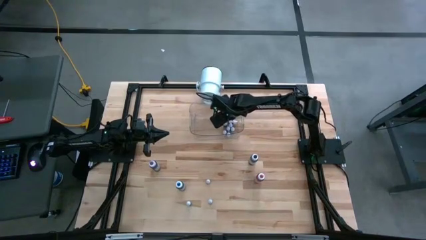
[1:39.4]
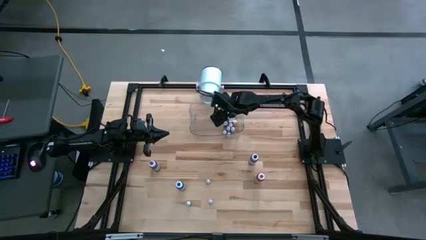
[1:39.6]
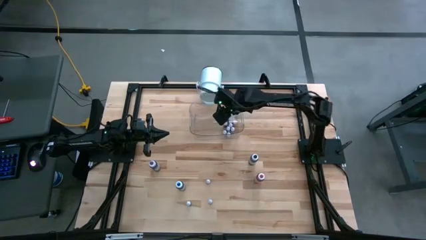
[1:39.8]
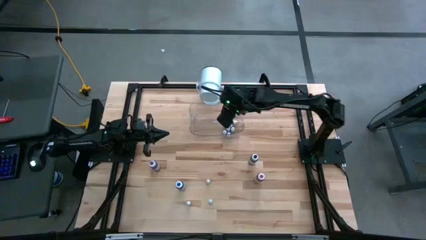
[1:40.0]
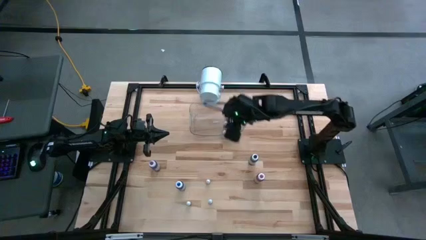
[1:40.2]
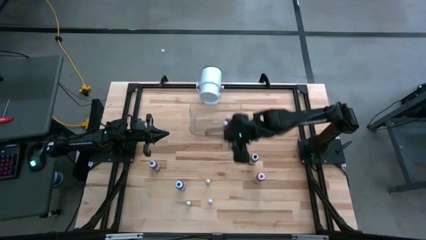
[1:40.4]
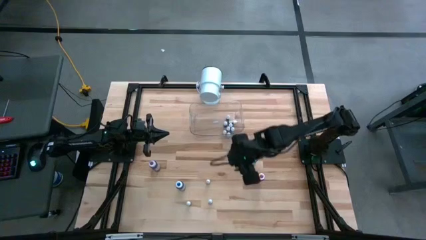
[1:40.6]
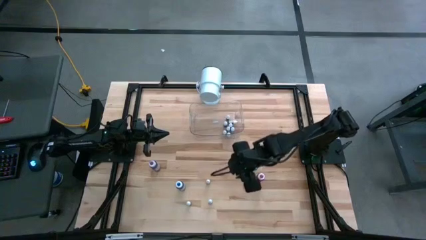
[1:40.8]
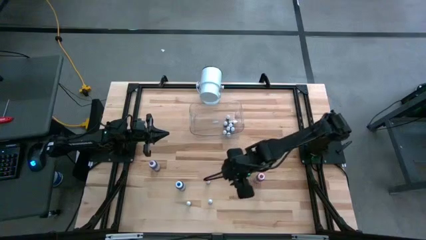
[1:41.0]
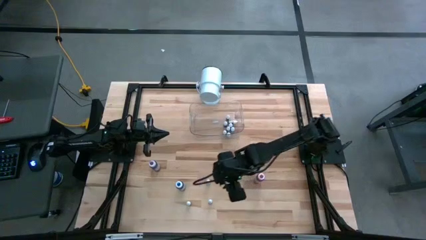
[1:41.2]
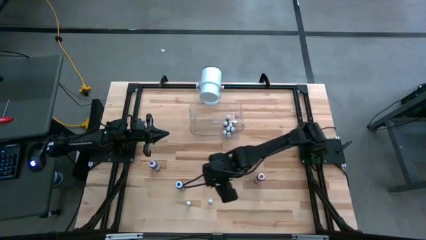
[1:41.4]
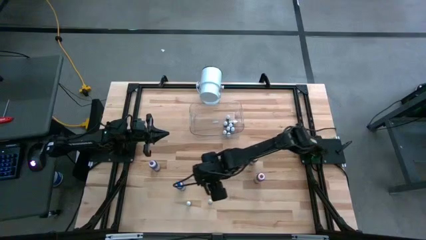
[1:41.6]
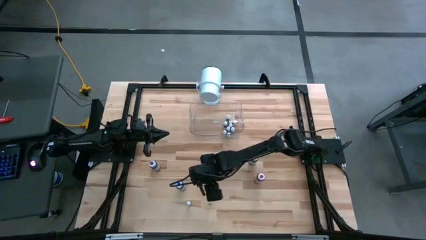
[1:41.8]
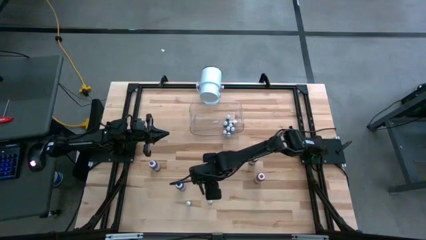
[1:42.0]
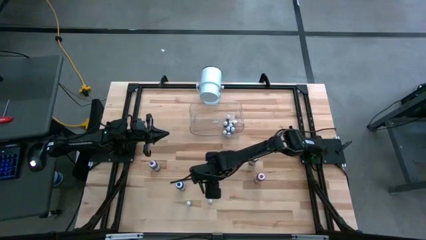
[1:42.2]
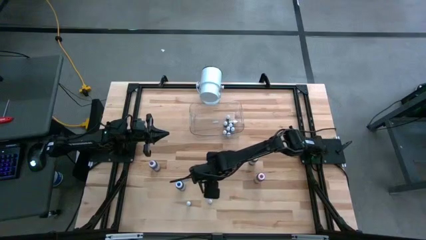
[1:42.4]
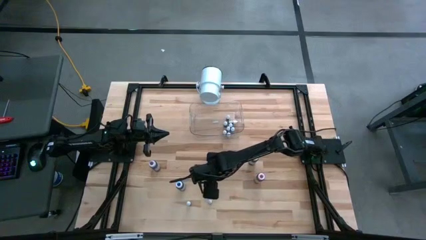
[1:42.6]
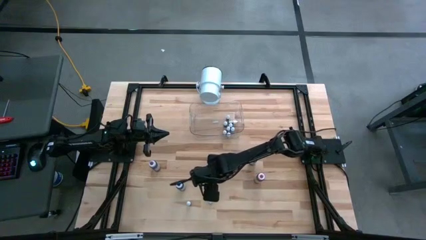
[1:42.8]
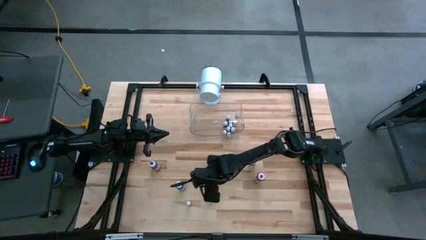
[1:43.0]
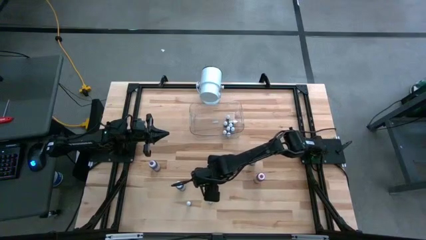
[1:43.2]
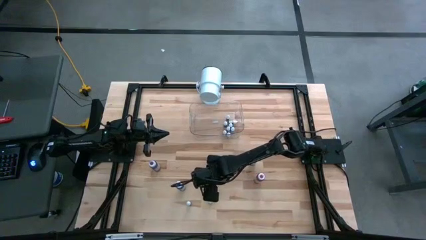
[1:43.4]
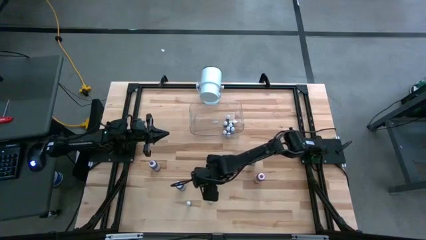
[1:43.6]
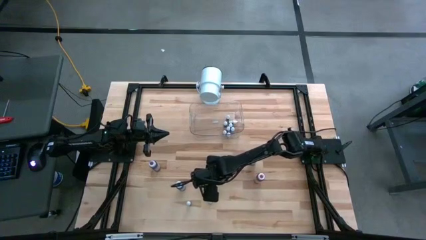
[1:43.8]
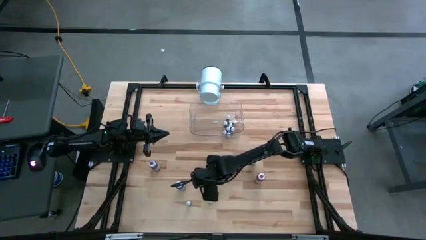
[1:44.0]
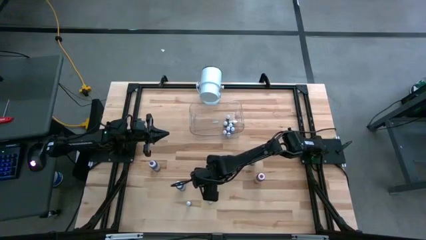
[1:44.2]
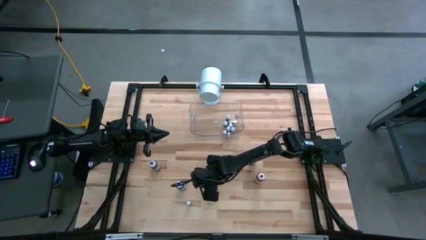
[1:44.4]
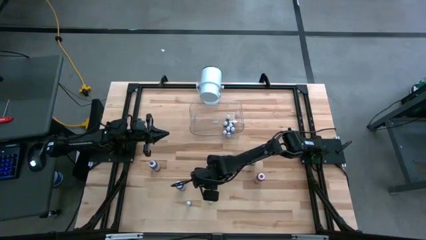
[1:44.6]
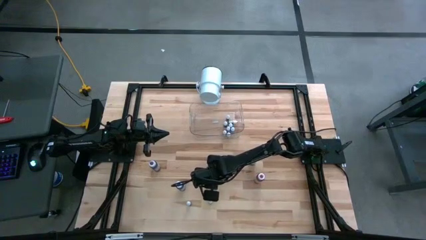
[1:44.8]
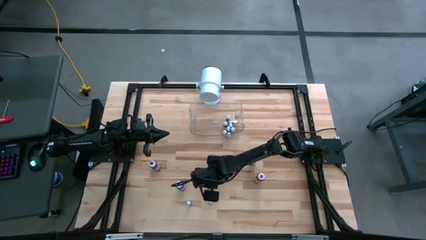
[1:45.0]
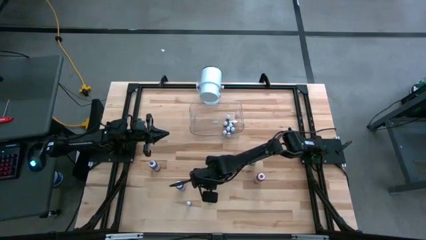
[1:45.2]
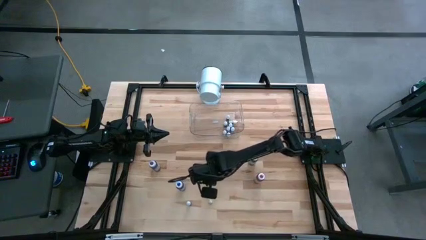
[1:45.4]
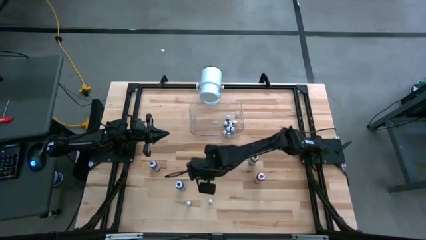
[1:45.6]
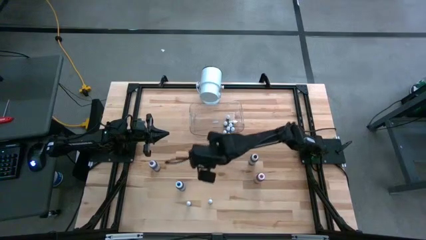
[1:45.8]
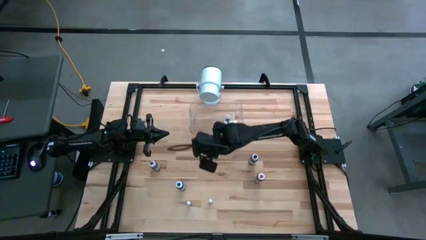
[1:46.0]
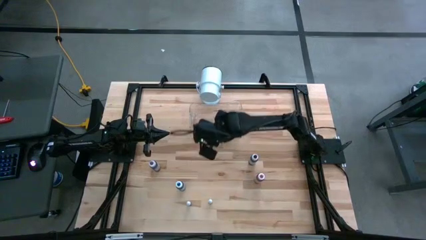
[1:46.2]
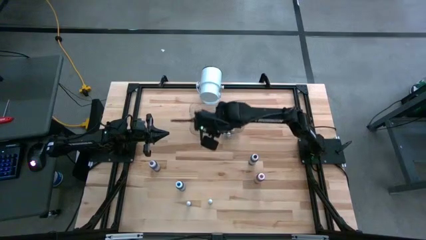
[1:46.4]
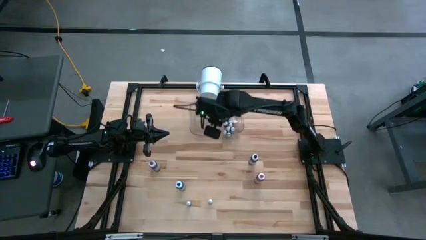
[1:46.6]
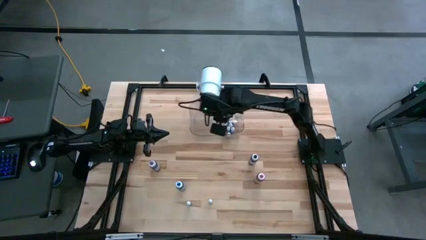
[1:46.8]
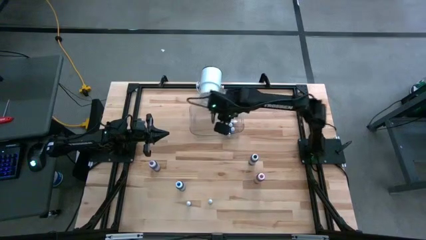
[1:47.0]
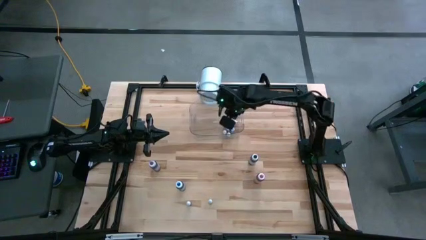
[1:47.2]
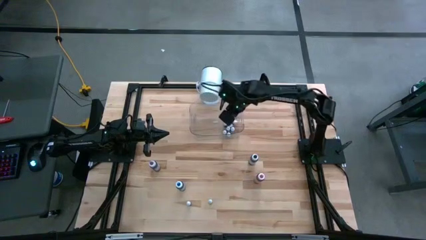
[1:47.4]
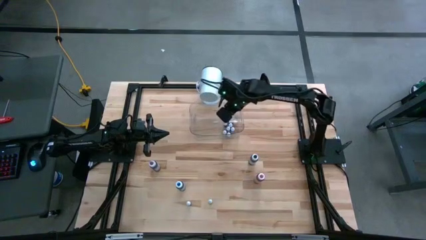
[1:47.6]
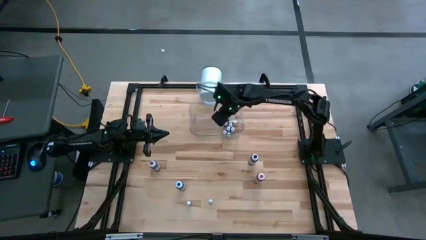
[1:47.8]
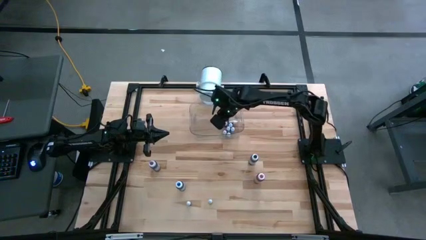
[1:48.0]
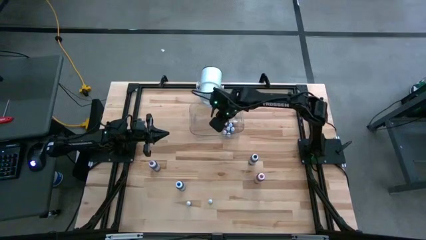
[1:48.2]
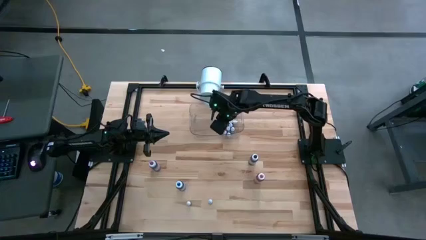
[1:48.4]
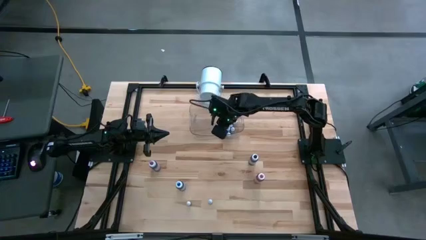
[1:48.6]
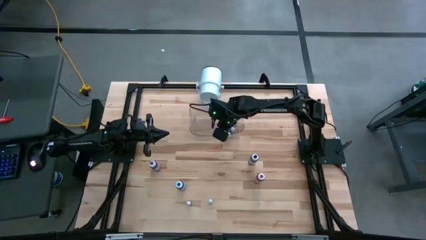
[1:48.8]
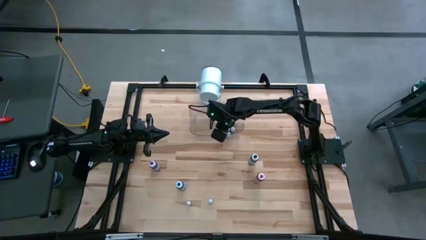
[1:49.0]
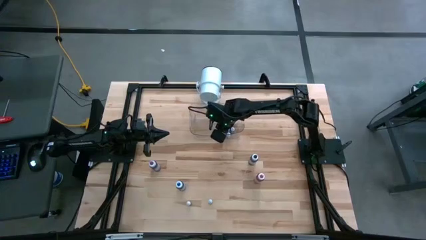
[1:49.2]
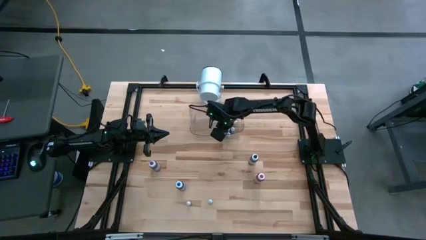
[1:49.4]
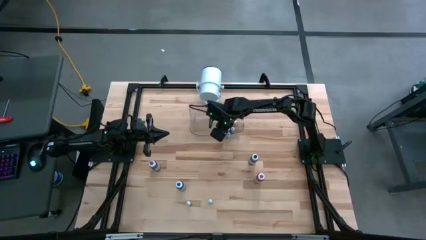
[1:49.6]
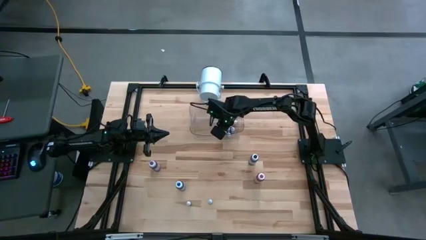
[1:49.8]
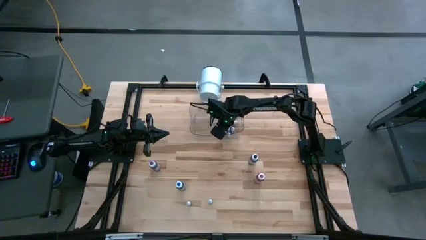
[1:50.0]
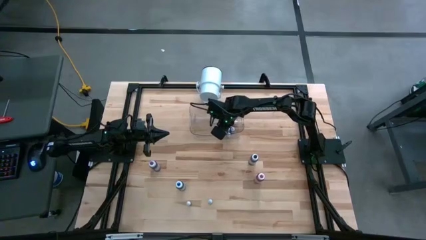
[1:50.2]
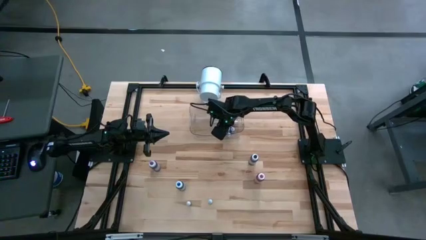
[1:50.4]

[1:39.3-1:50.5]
Task: Pick & Place food coloring
Put the small red food coloring bottle into the transparent bin
